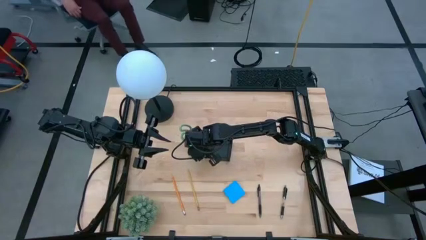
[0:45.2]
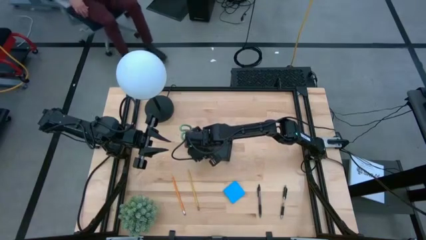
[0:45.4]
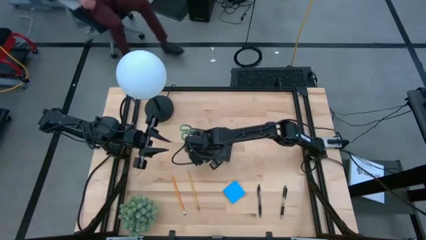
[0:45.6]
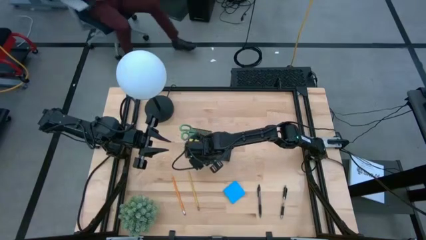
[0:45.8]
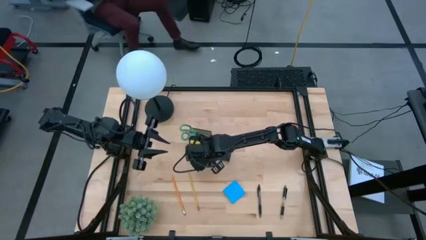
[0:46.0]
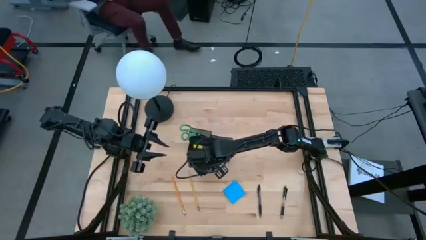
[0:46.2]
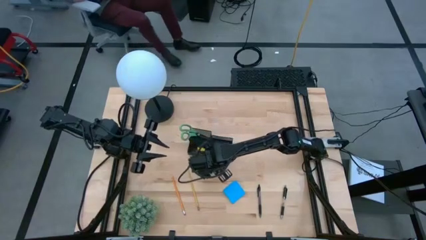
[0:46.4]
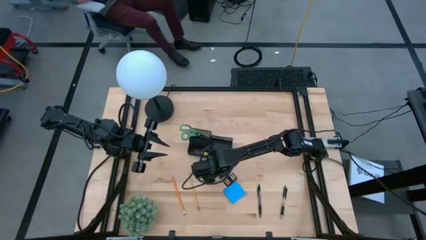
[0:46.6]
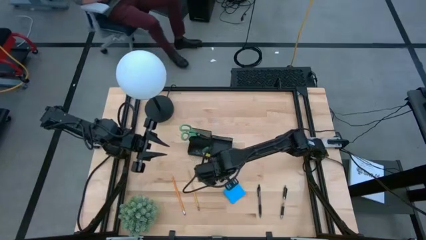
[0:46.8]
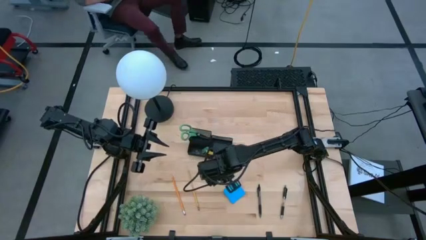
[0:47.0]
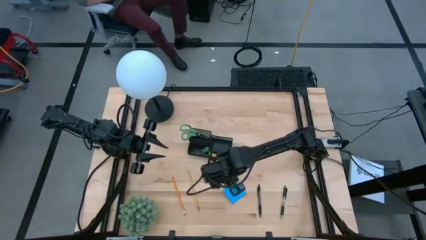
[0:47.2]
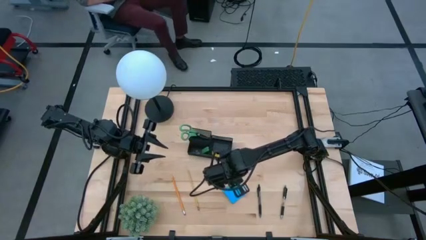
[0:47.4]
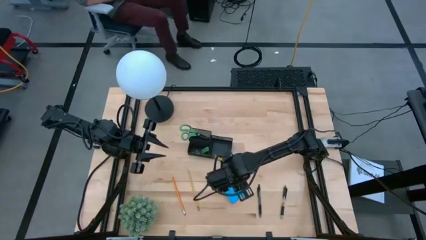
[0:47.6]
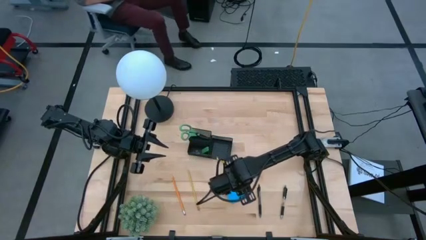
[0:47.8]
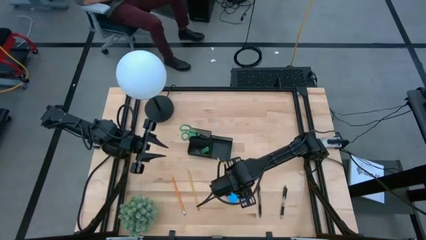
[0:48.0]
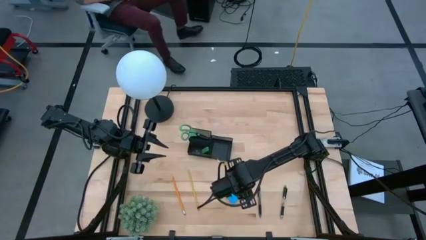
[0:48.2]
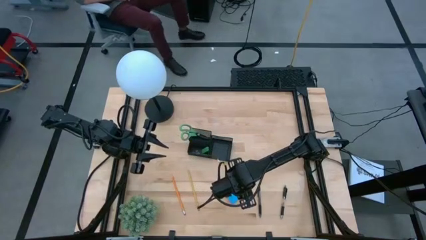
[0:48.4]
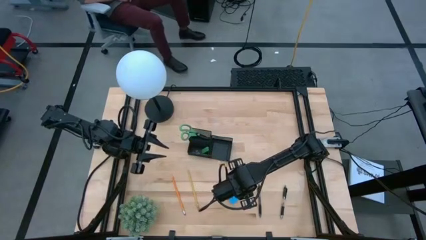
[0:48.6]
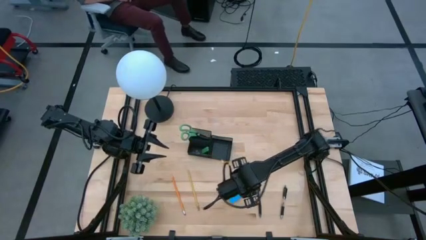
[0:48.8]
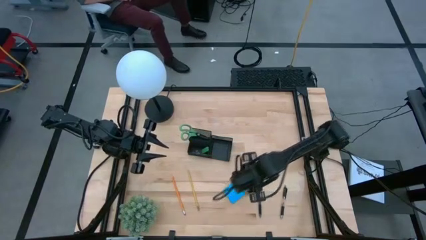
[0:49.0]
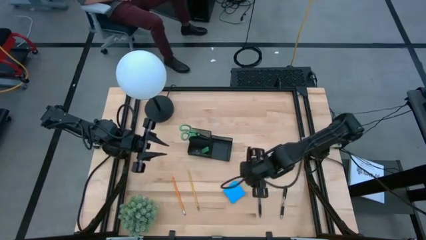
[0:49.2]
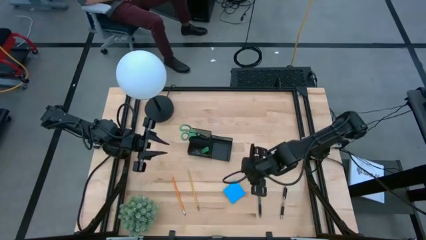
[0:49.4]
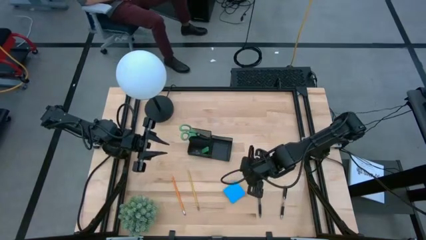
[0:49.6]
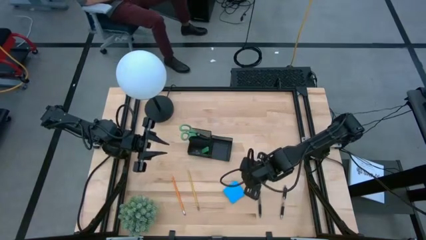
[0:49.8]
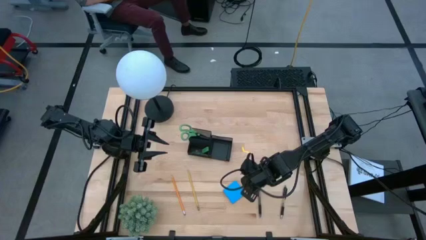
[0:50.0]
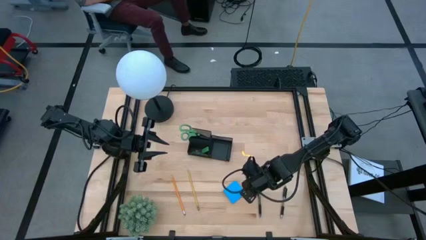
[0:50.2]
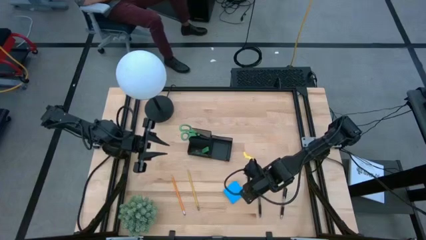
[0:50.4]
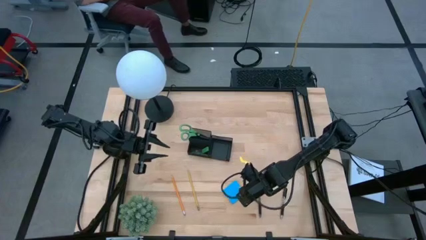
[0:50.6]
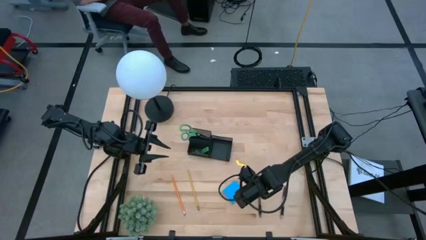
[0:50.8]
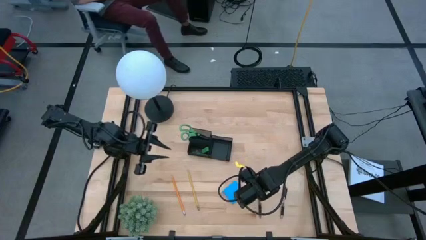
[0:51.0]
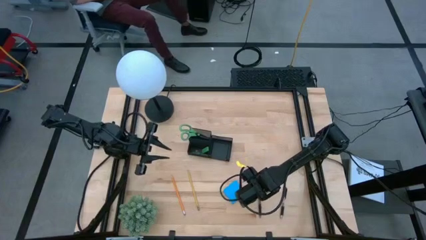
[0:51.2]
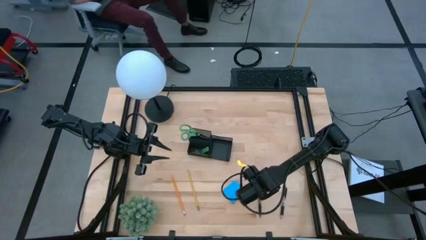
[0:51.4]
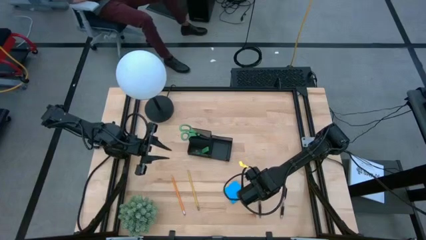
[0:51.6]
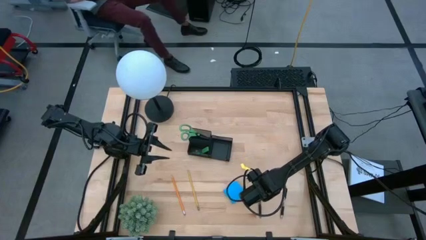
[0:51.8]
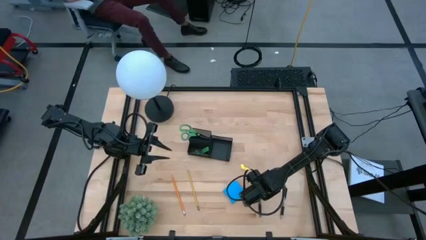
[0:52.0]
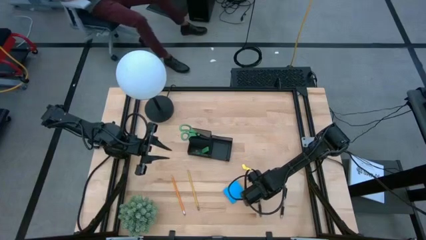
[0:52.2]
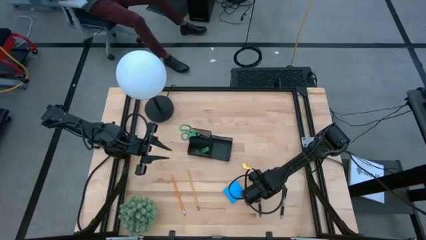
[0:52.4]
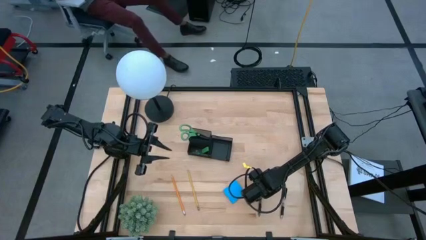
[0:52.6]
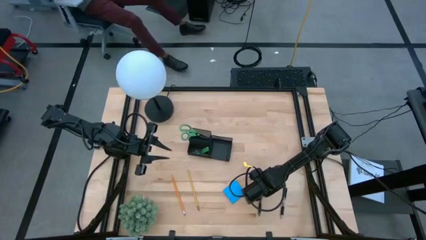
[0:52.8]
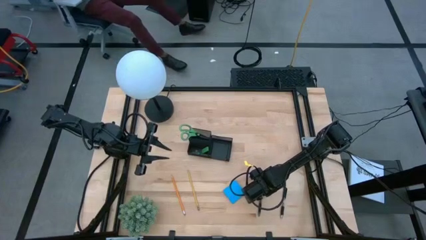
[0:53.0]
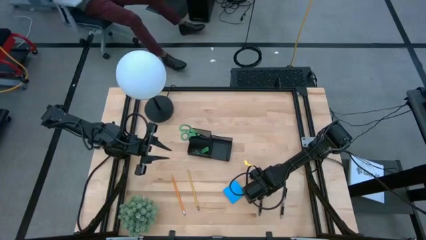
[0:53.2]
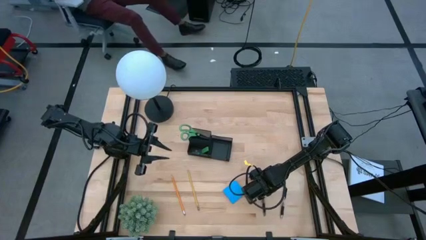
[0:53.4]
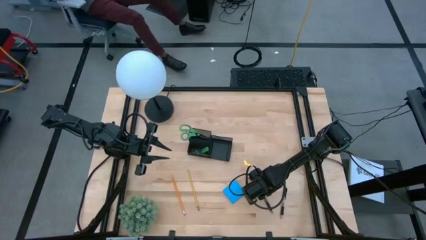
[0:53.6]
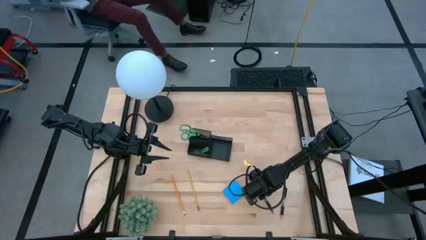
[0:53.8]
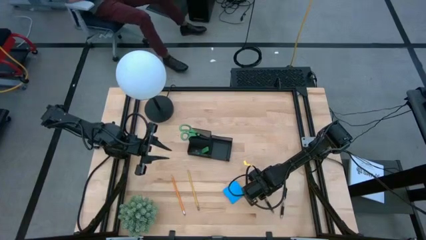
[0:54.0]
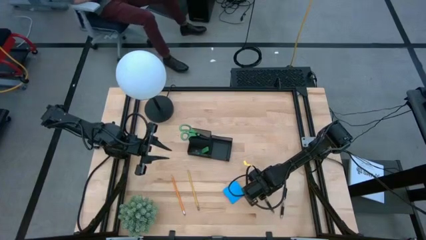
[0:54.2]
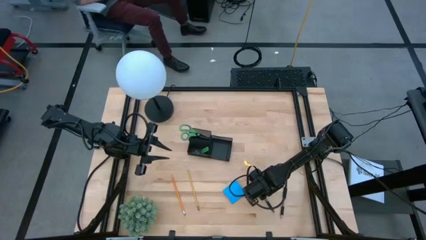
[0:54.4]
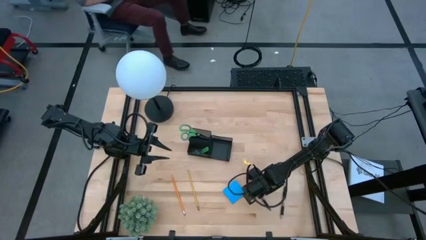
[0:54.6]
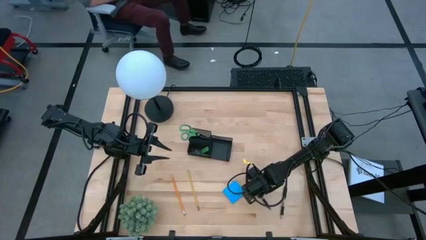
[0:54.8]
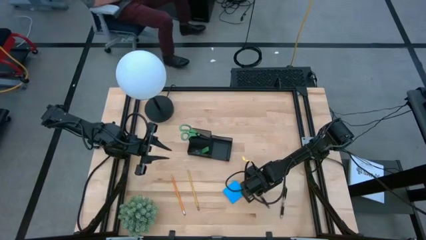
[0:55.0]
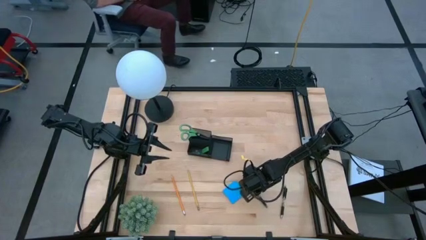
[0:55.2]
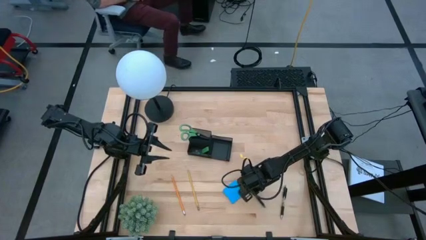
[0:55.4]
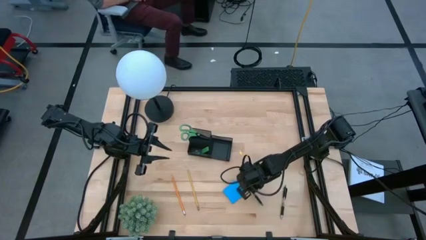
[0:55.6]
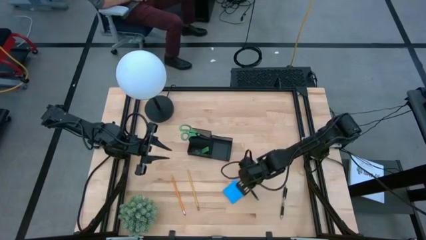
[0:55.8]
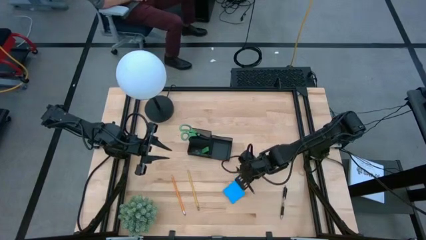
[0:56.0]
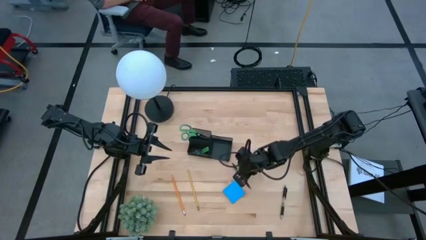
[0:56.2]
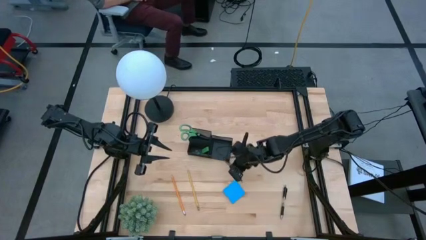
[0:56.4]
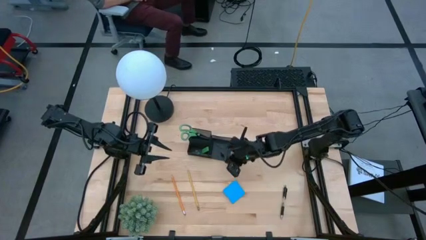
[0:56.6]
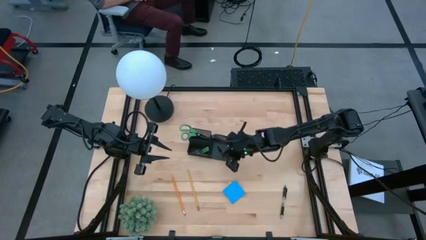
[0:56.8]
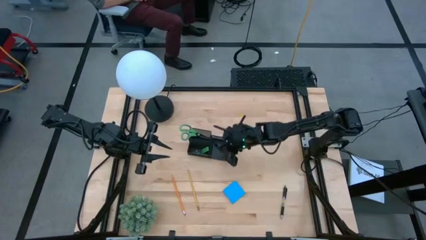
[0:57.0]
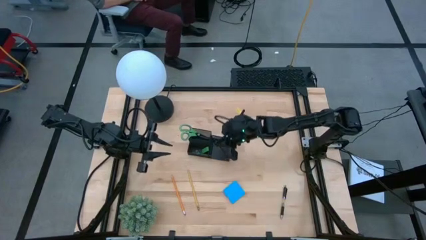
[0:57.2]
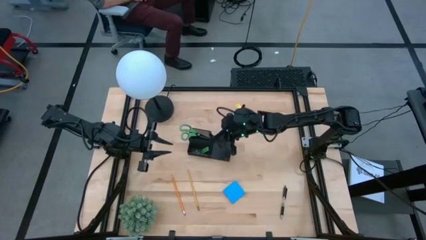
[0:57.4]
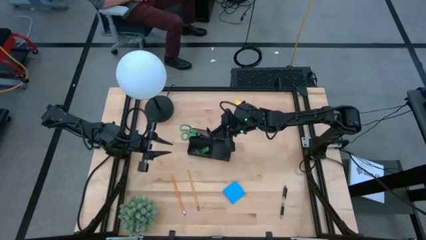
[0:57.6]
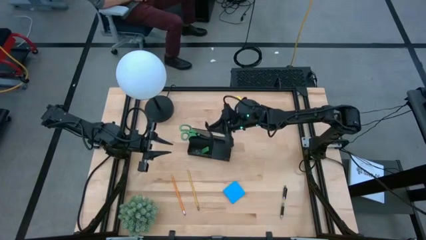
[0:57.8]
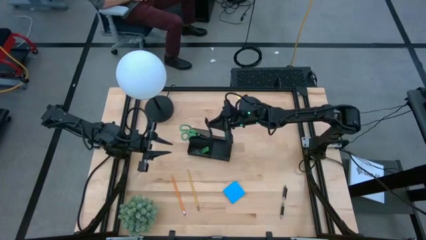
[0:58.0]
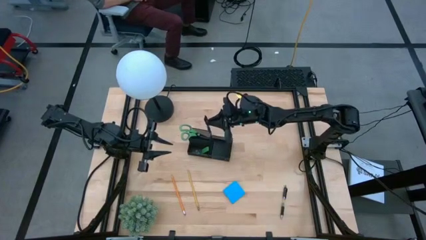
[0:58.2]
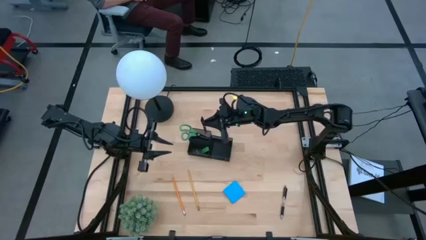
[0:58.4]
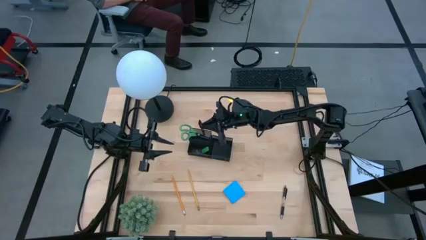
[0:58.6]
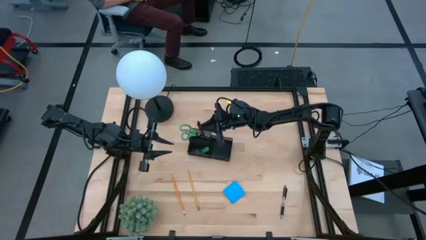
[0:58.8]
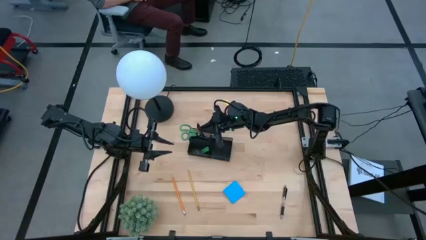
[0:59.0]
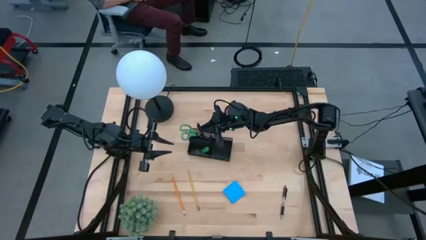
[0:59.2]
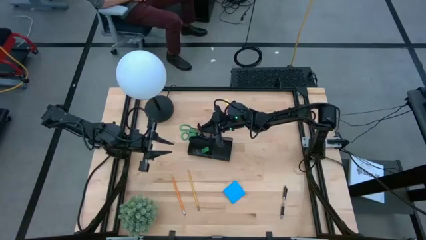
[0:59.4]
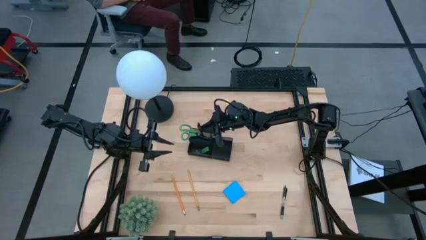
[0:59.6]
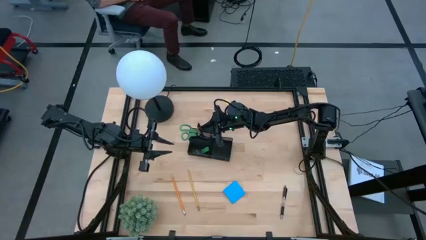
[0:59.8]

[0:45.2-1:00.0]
Task: Pick and place office supplies into organizer
Put the left black pen into the black desk organizer
